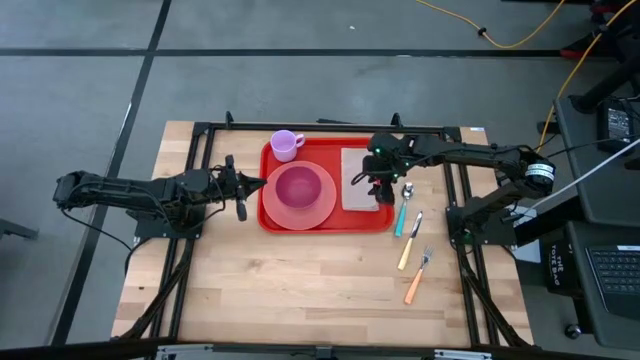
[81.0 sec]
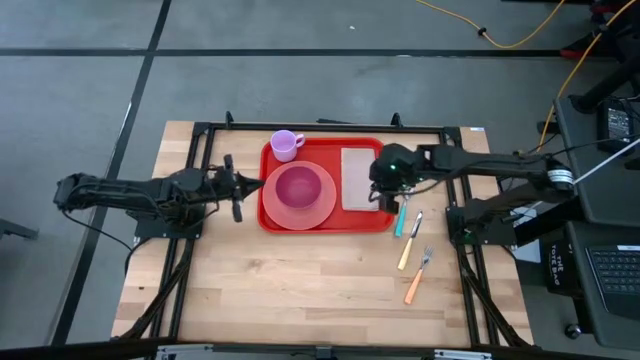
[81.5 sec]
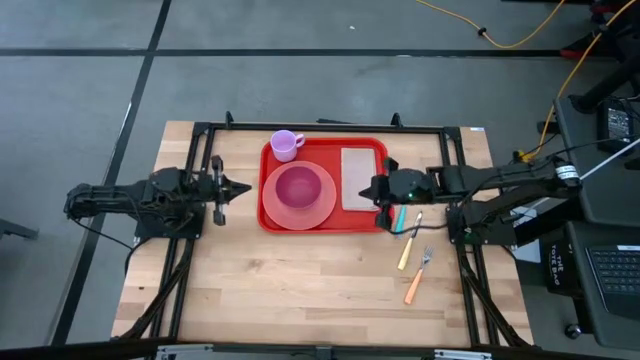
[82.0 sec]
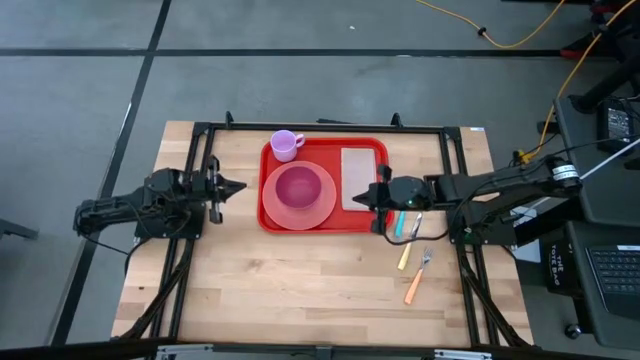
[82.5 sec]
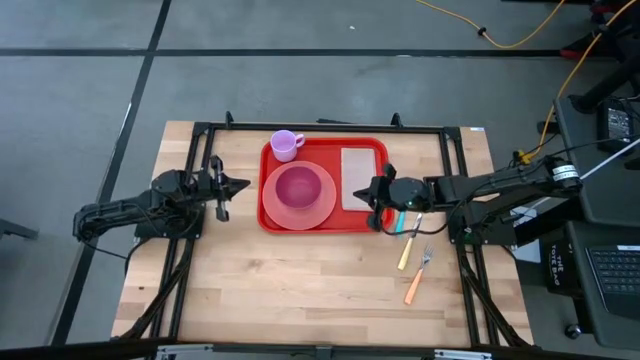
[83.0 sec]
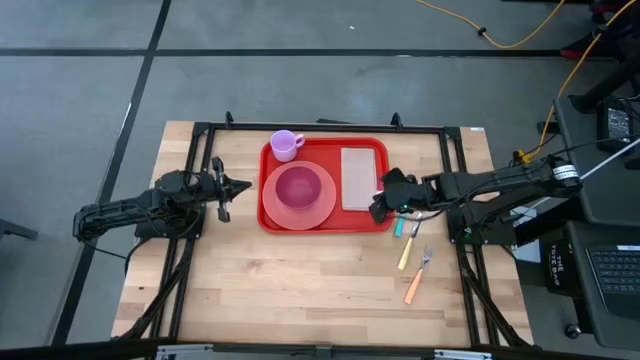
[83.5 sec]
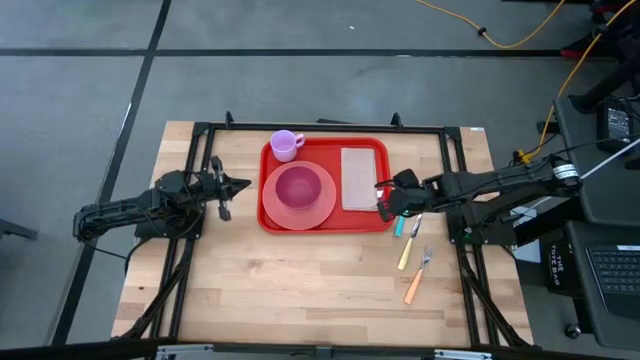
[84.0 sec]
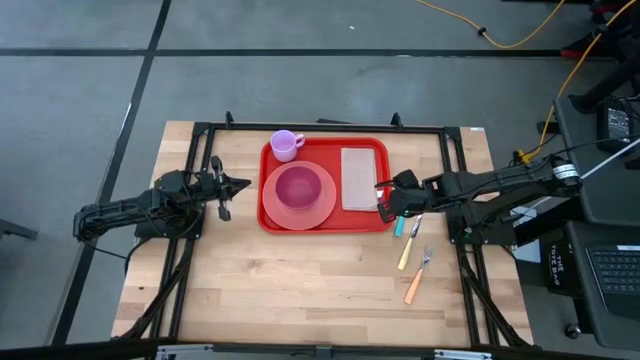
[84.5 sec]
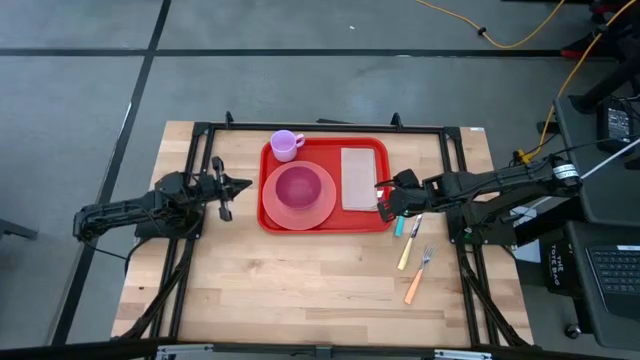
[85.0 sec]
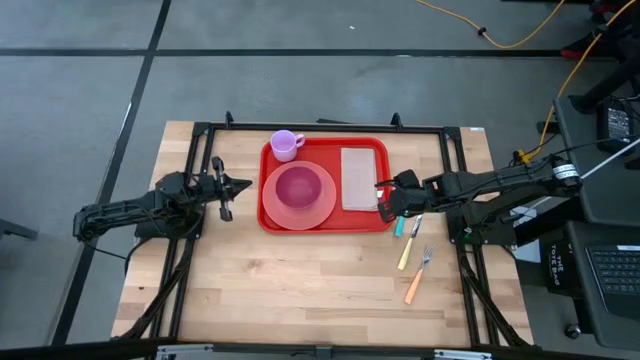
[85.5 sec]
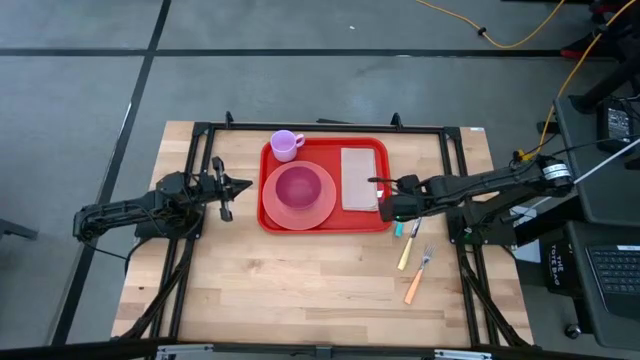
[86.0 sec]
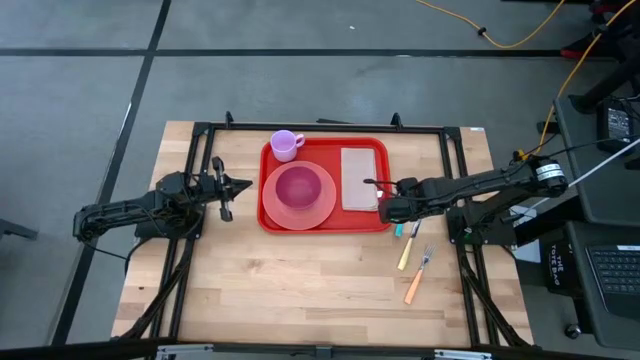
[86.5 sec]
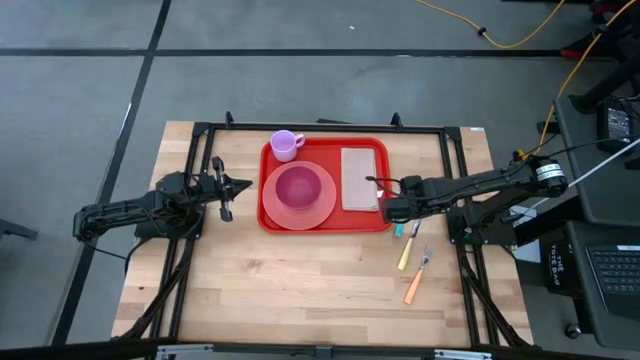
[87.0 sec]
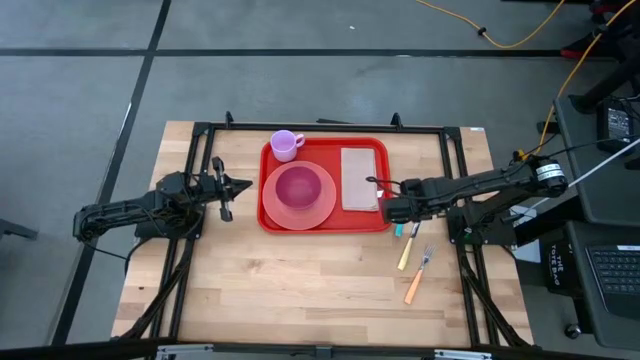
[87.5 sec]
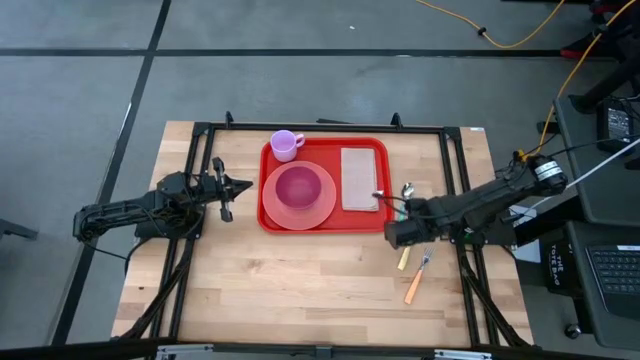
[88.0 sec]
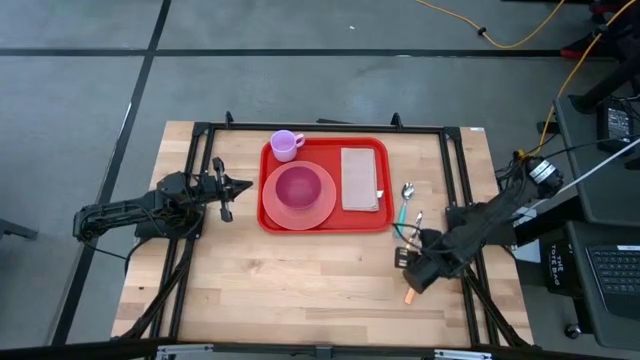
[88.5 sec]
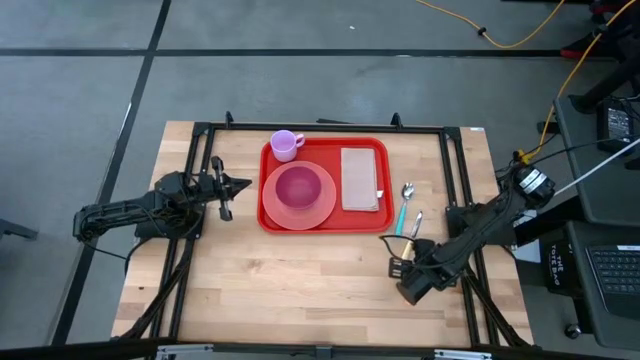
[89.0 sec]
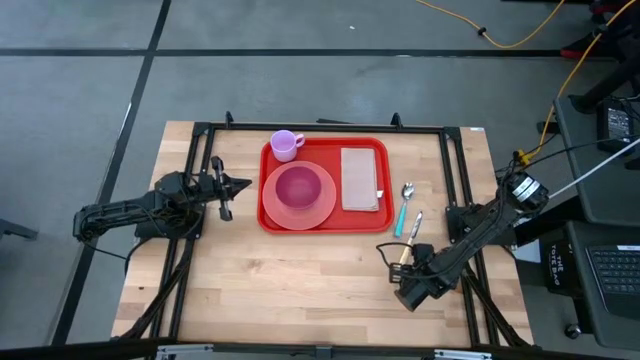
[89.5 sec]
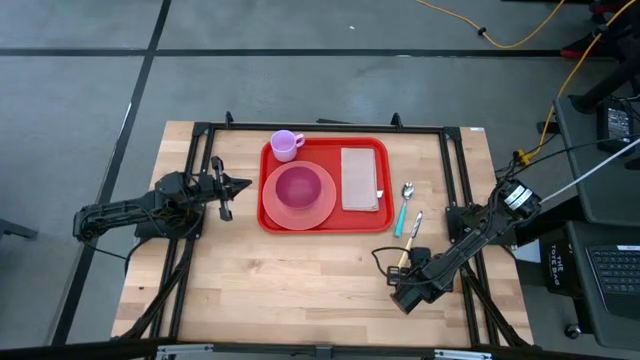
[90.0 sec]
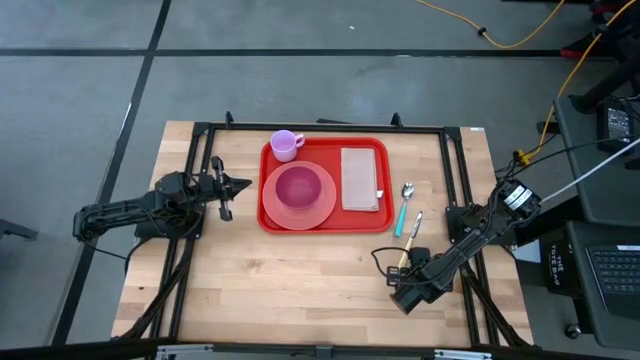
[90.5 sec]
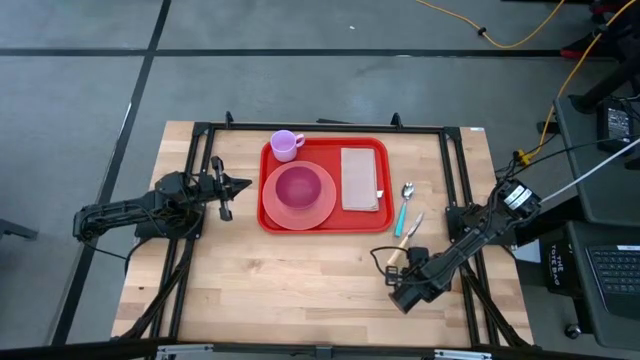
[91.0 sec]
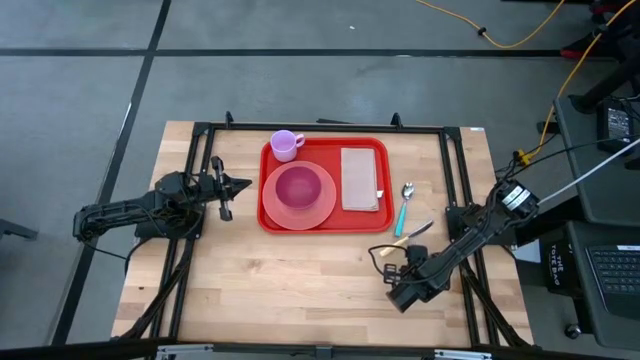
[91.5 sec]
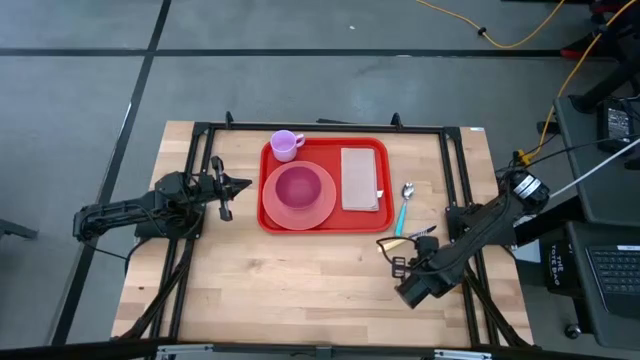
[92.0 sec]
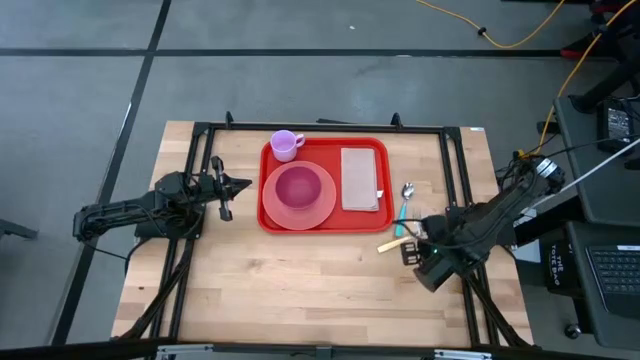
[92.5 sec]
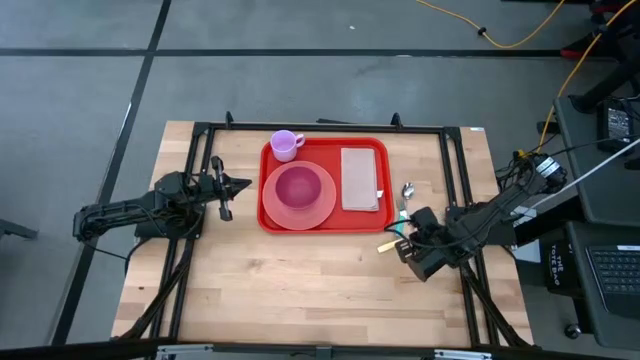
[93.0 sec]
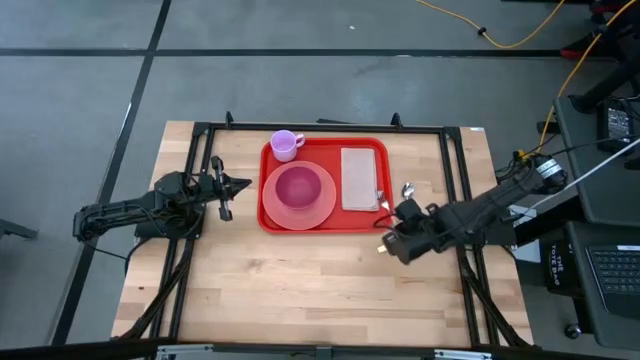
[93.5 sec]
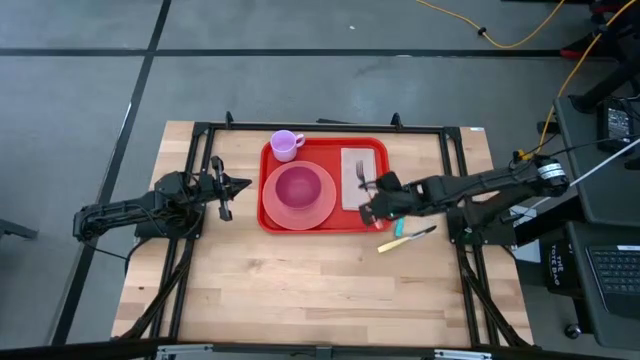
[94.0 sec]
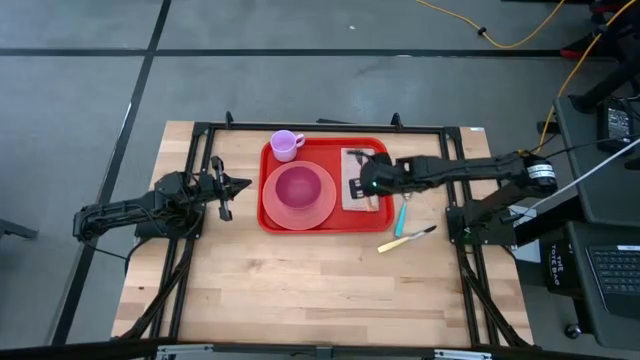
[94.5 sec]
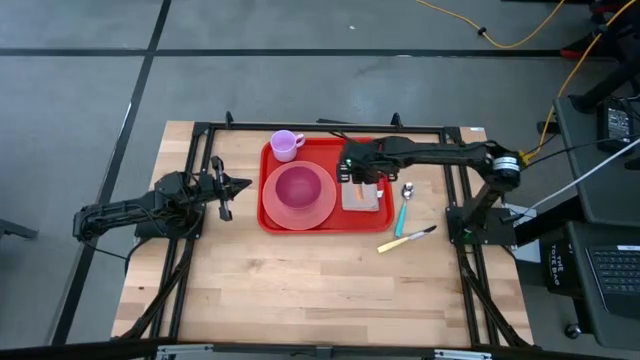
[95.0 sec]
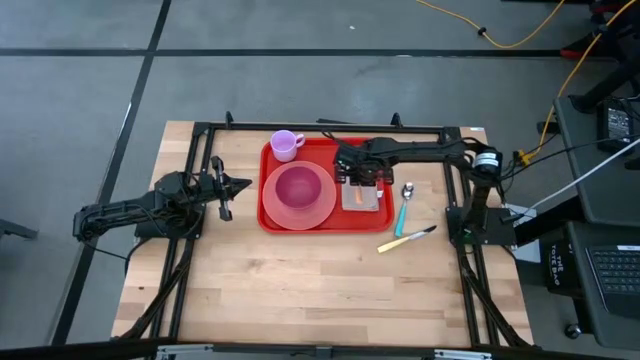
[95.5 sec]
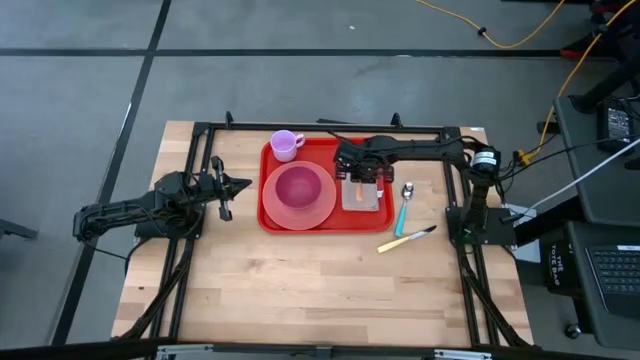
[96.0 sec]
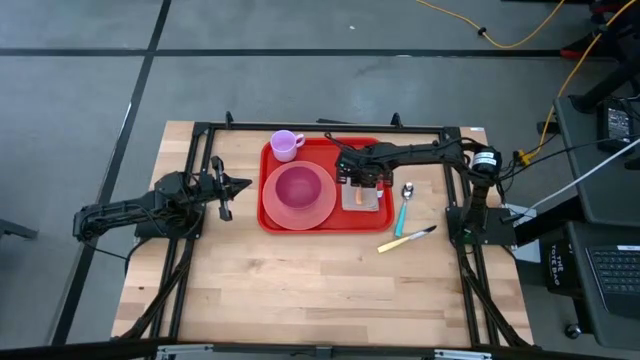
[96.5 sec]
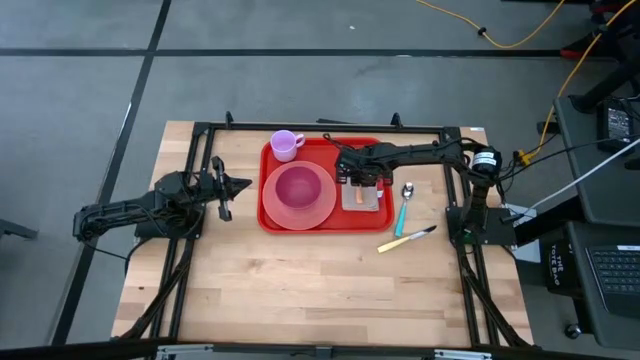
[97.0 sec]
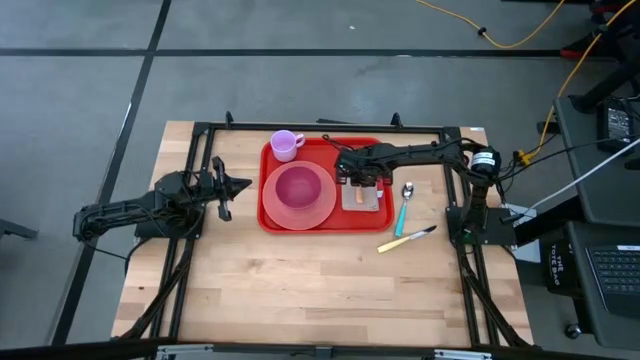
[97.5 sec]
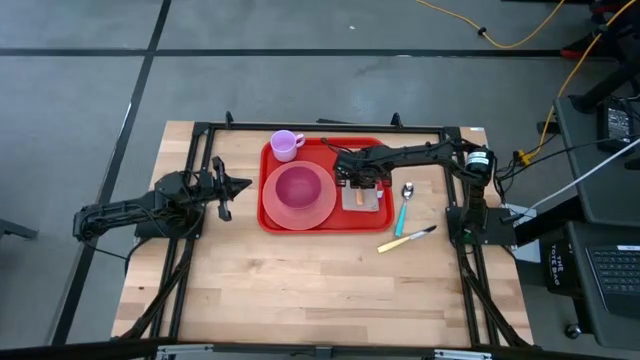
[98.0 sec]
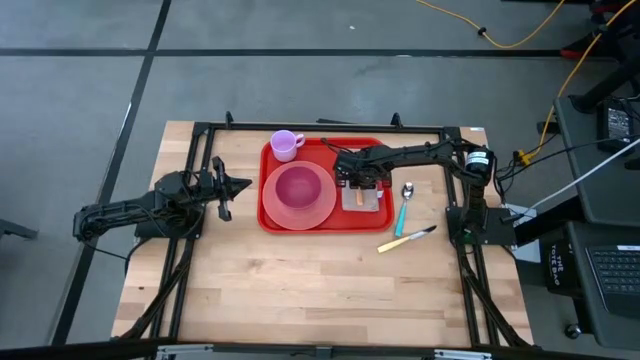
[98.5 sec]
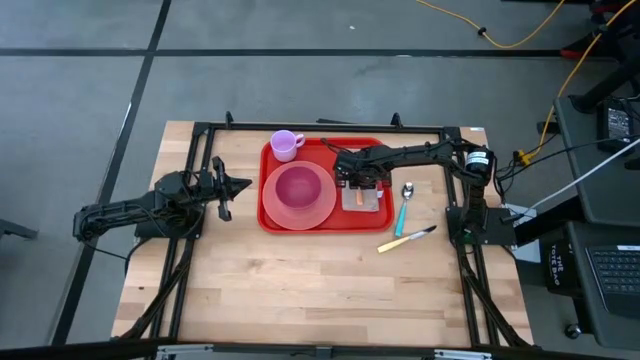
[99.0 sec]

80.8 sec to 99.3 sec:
Task: Set up tray
Put the orange fork on top of the brown napkin beside the pink plate

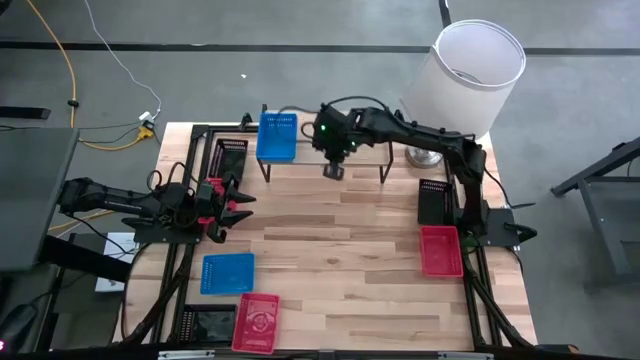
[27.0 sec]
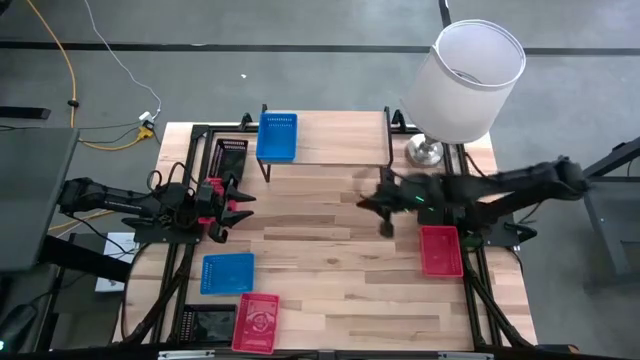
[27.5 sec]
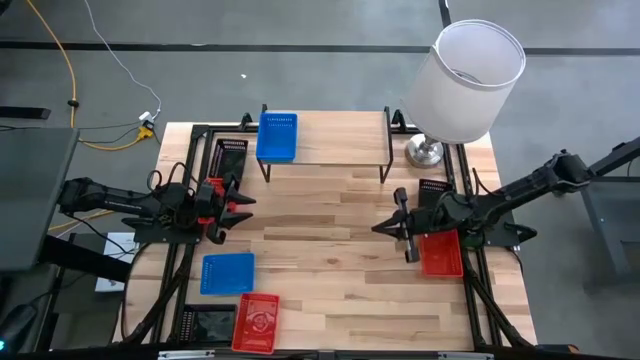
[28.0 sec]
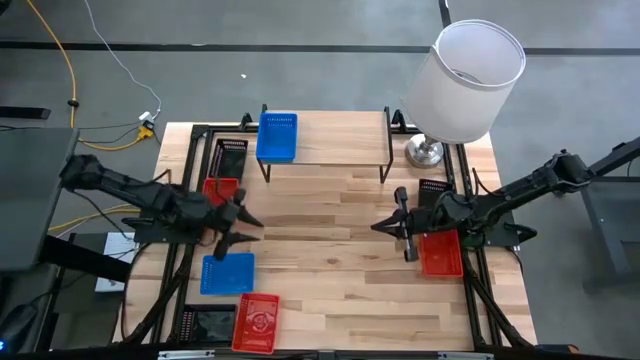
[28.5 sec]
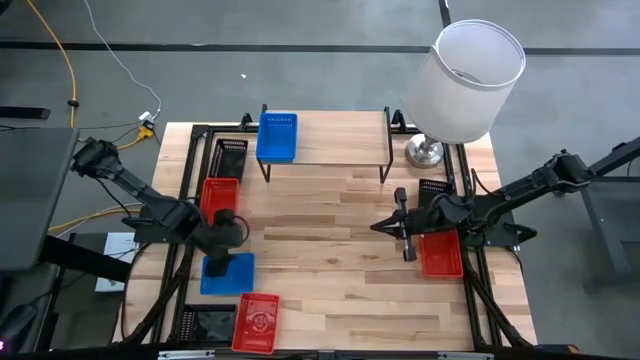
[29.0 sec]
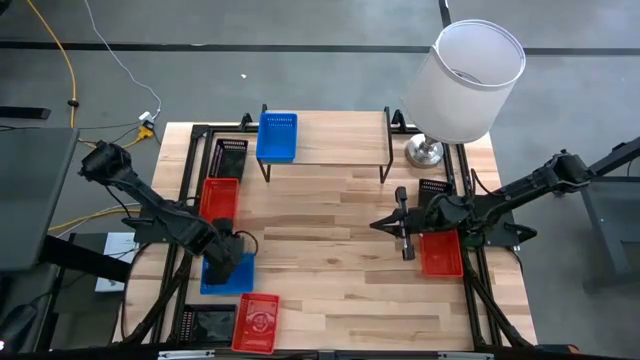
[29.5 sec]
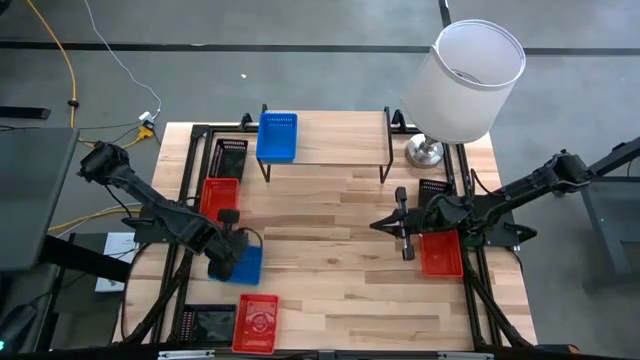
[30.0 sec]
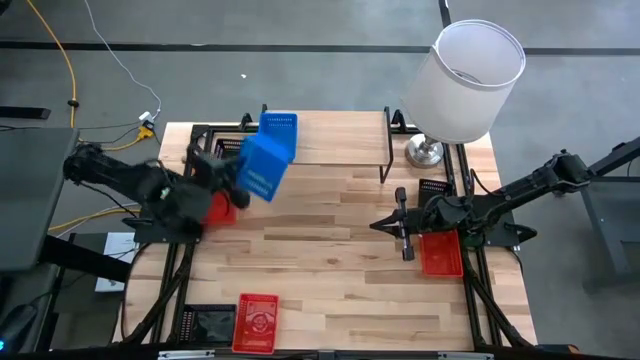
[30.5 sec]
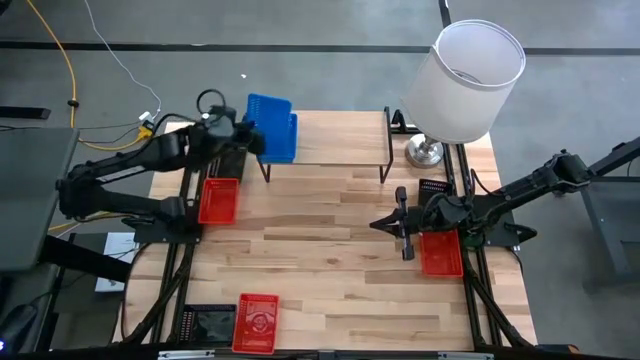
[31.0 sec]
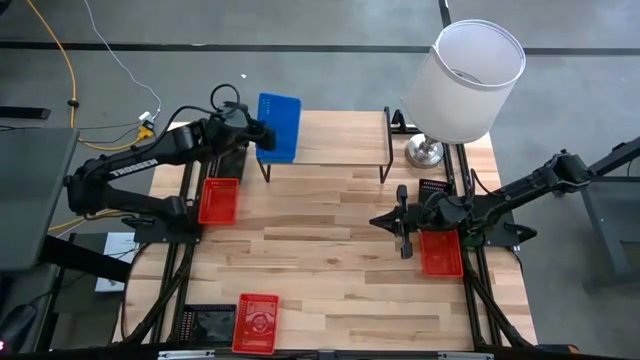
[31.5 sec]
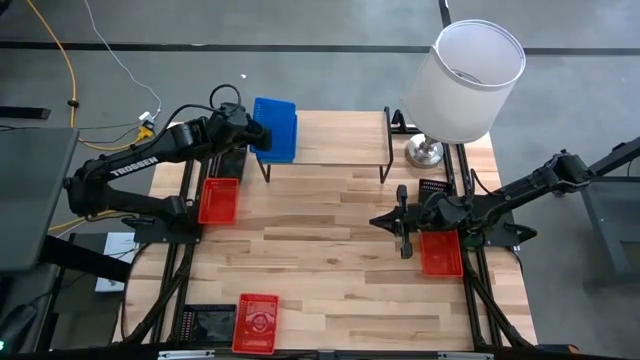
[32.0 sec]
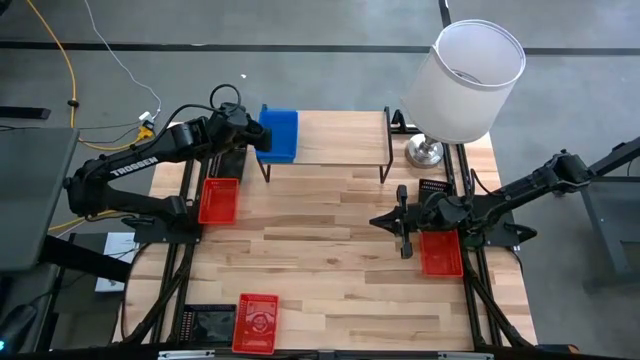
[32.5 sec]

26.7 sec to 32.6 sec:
Task: Stack baskets on shelf by color
Stack the blue bin on top of the blue bin on the shelf
